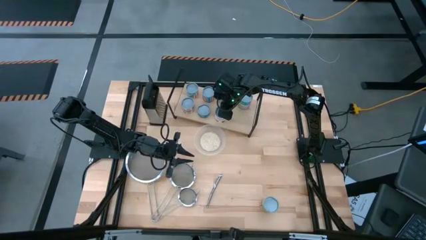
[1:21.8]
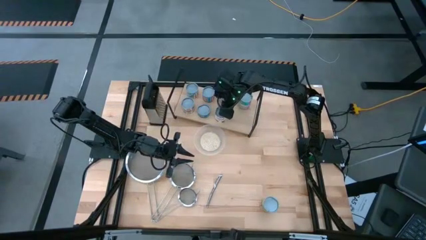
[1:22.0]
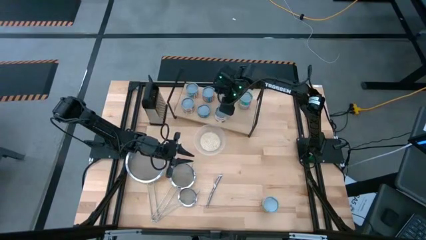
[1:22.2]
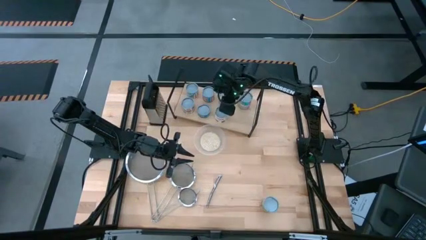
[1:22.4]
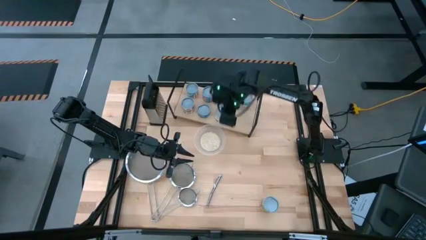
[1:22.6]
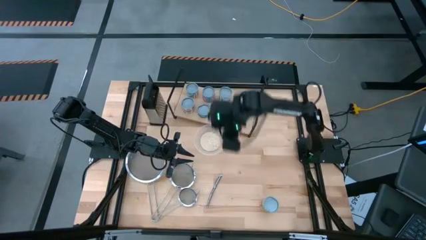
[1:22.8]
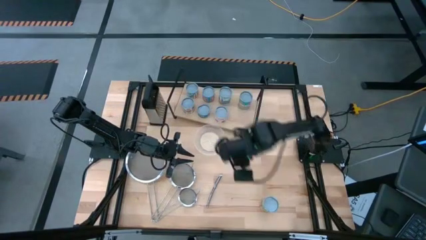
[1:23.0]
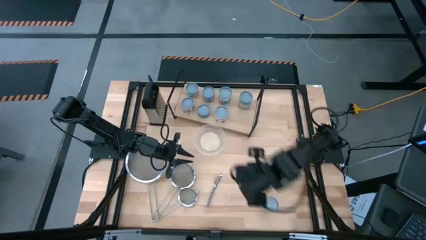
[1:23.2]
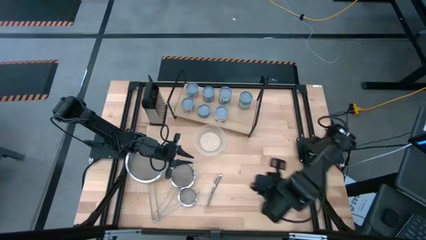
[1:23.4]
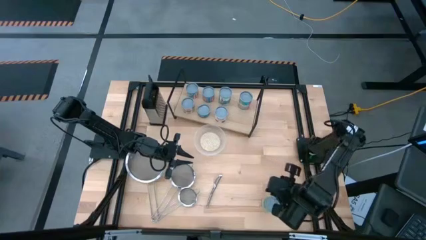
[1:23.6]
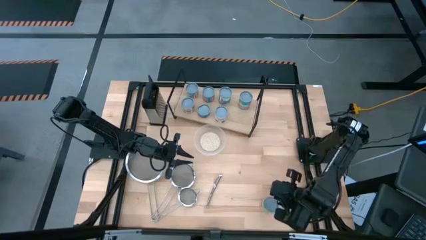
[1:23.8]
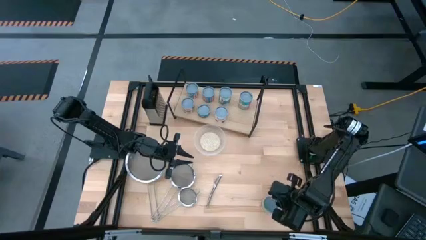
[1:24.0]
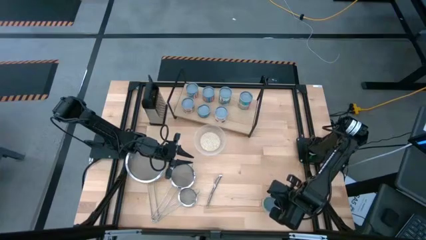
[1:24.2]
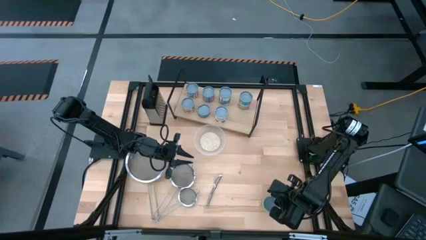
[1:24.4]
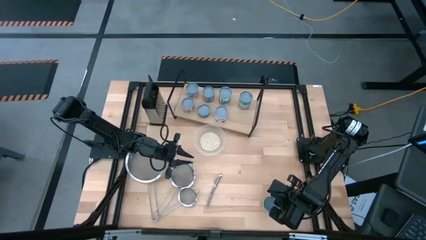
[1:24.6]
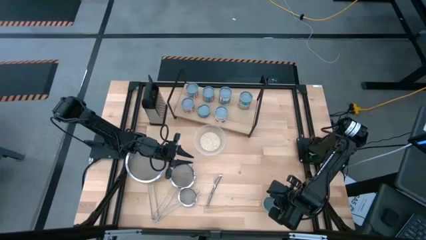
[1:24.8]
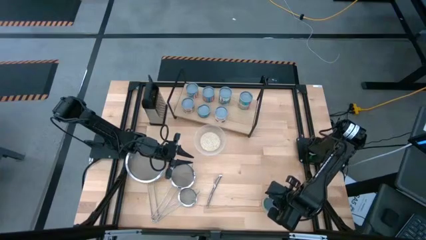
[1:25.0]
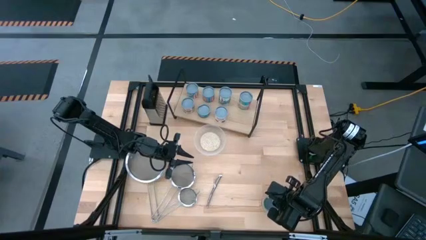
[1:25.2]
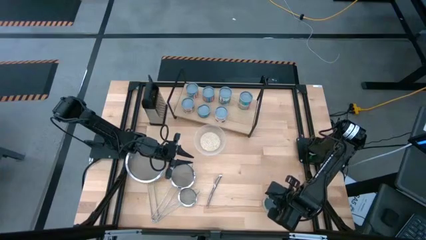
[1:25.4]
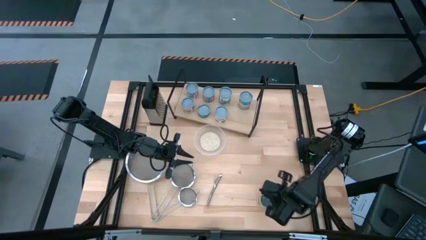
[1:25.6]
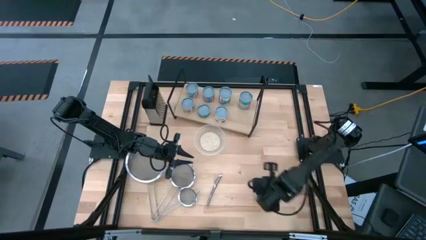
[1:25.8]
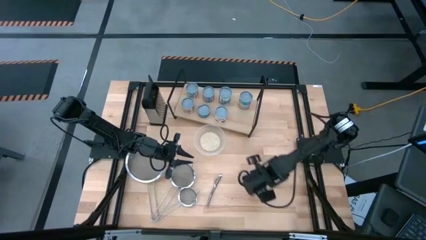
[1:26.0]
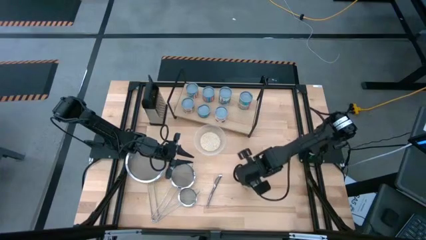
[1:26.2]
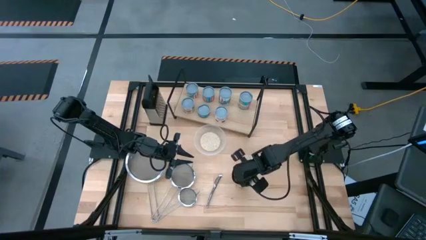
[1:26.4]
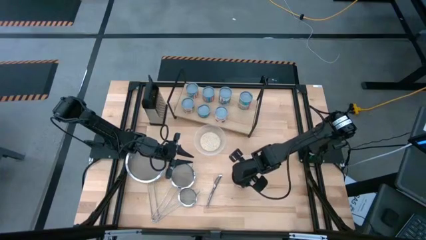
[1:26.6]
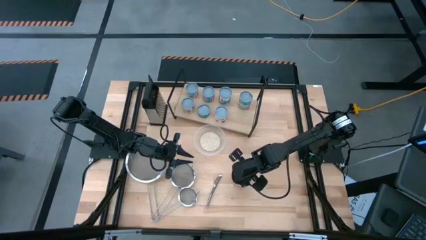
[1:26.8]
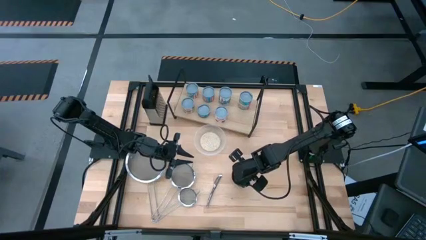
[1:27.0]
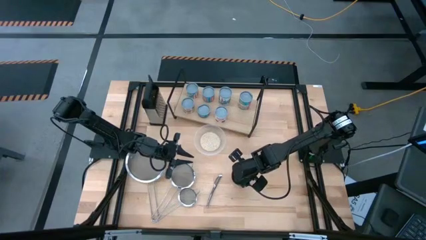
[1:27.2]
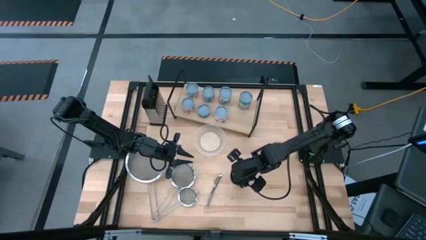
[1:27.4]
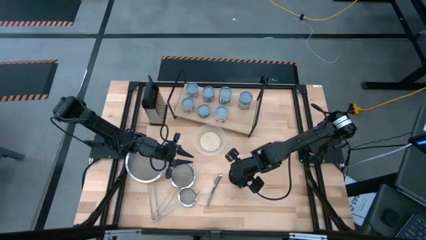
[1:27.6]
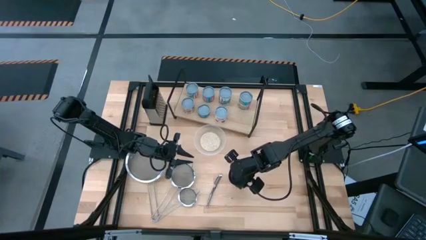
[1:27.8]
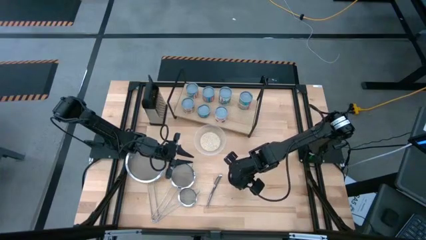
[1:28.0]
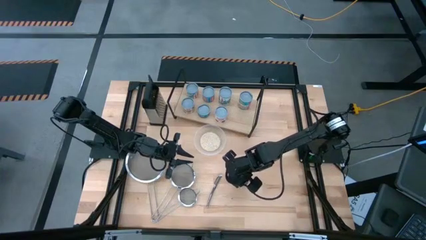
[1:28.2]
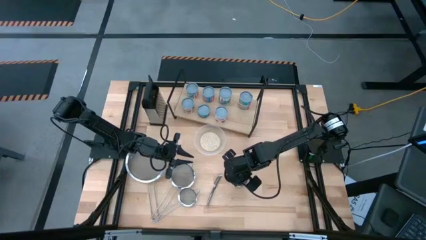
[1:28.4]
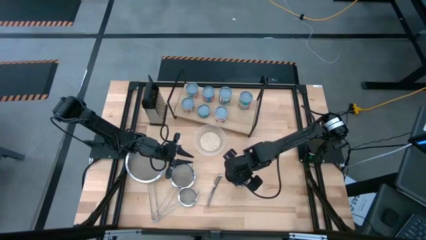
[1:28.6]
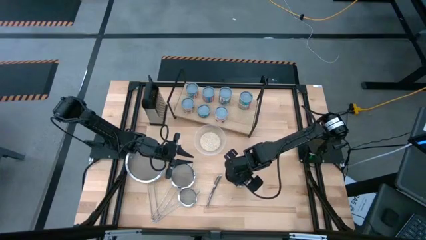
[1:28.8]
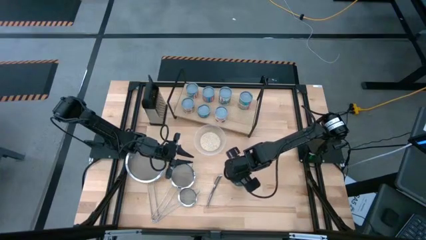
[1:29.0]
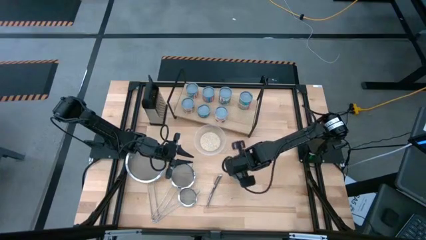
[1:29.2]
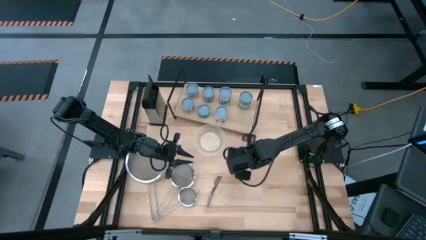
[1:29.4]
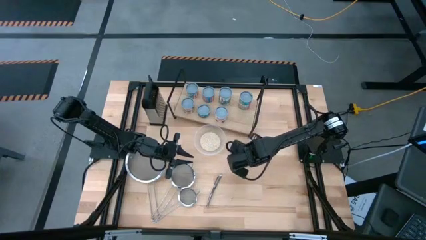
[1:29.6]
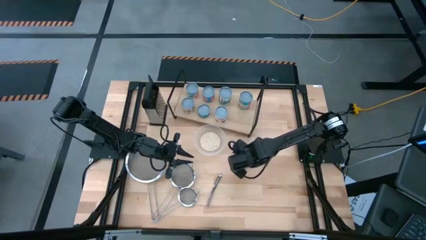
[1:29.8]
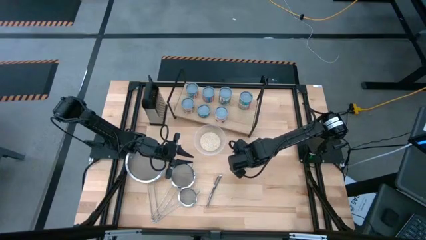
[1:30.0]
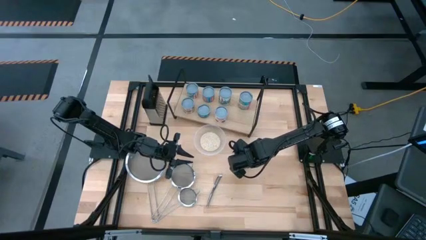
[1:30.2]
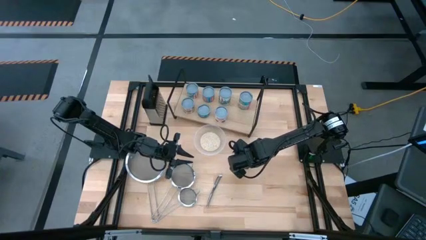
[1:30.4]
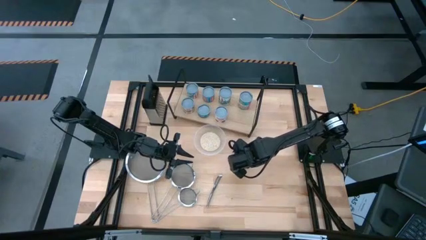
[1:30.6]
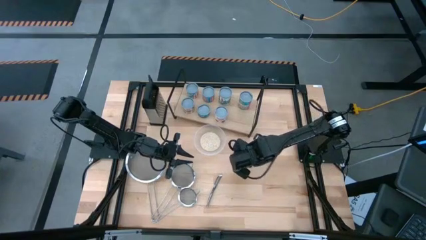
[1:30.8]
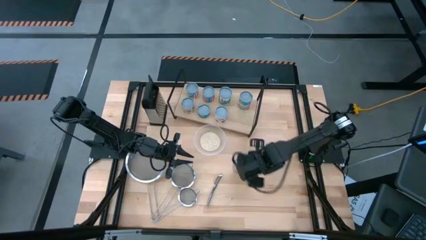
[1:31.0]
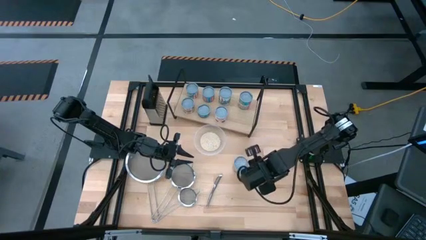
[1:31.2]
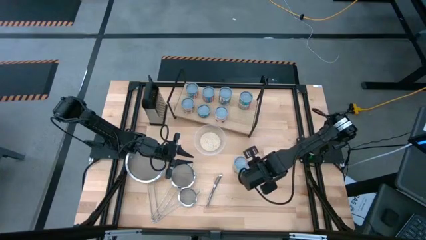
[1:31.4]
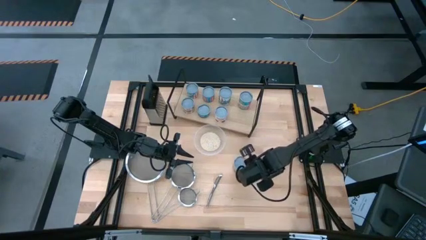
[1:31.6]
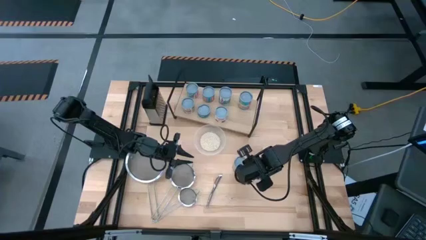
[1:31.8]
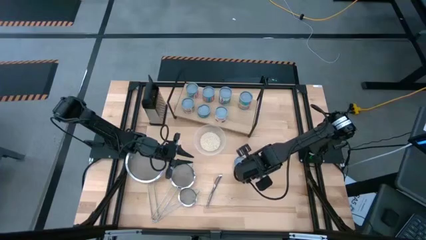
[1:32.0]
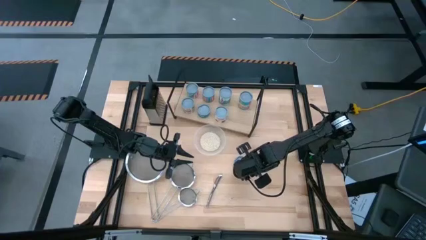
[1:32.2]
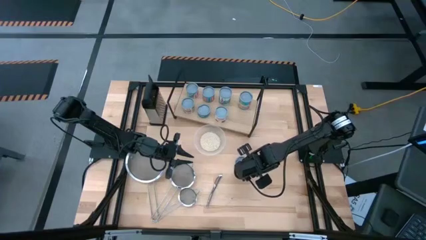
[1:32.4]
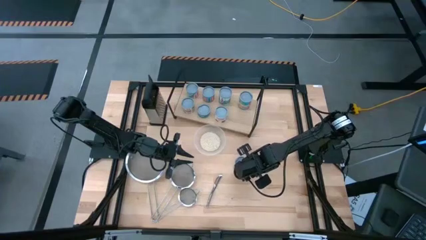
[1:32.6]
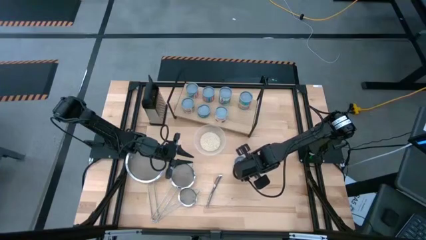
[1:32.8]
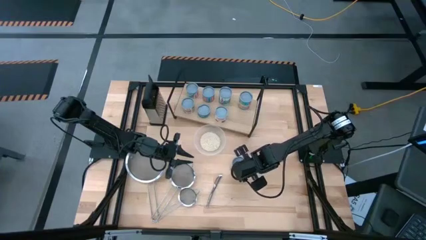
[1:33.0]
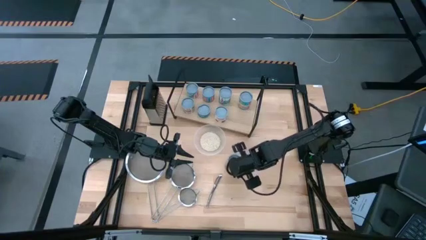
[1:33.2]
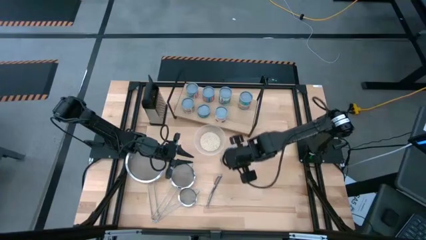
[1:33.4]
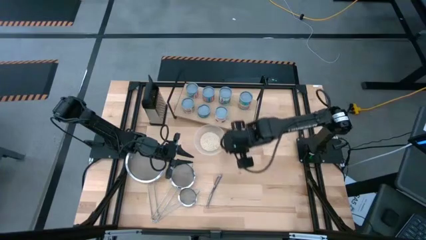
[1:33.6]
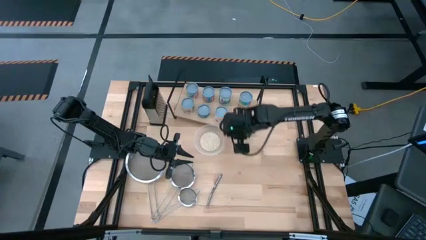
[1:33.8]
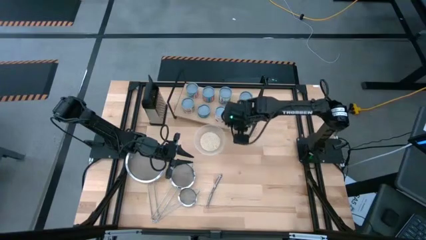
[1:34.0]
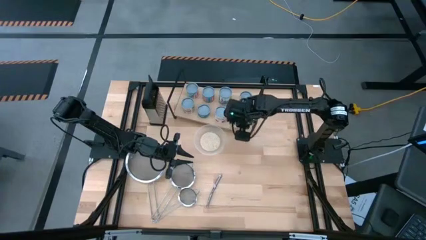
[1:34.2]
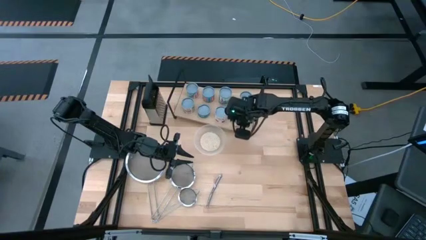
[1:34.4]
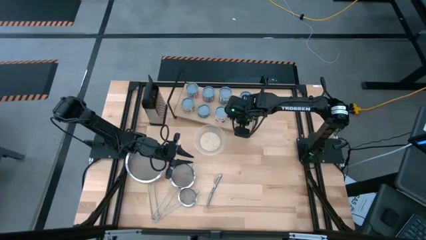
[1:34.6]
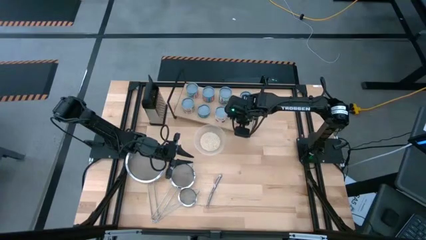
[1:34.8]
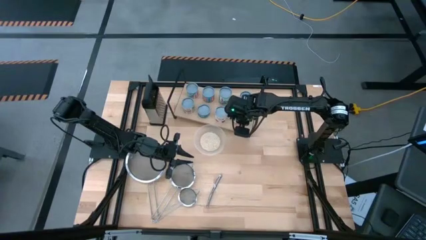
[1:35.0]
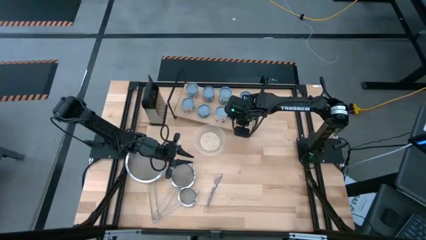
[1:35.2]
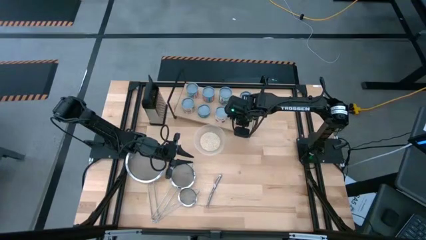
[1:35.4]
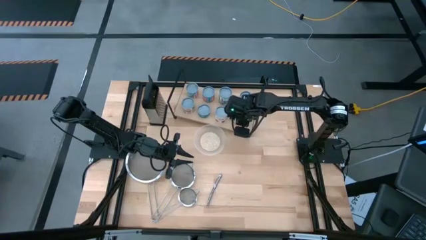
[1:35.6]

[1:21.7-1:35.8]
Task: Pick and place cans onto a shelf
Put the canned spaghetti sauce on the shelf

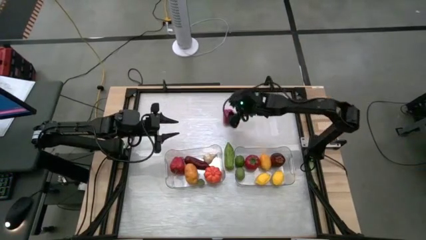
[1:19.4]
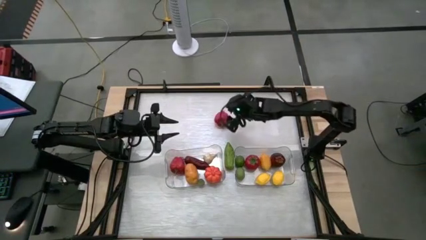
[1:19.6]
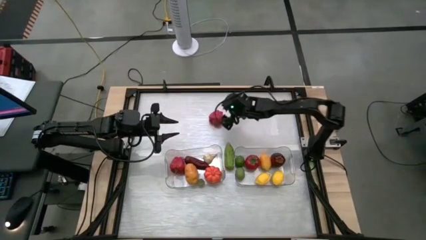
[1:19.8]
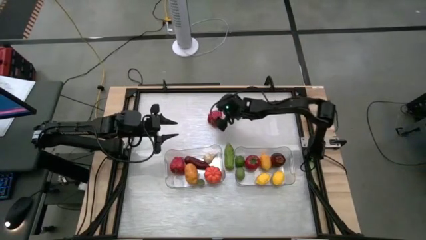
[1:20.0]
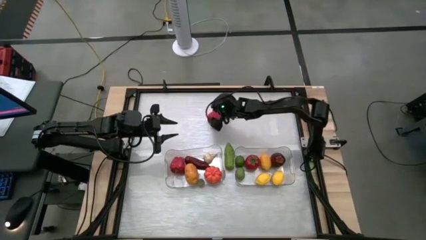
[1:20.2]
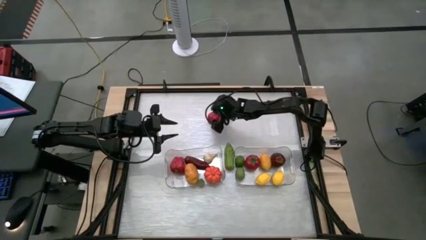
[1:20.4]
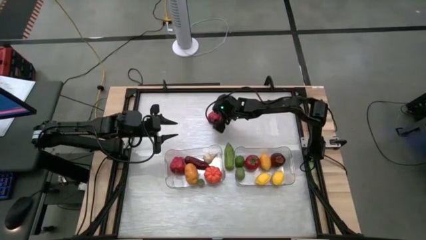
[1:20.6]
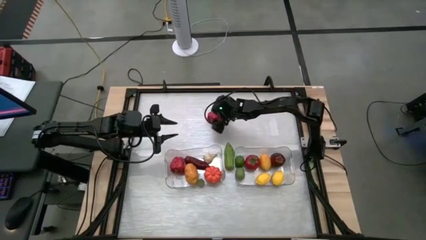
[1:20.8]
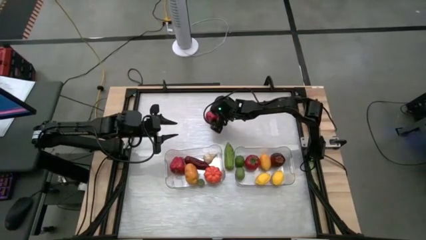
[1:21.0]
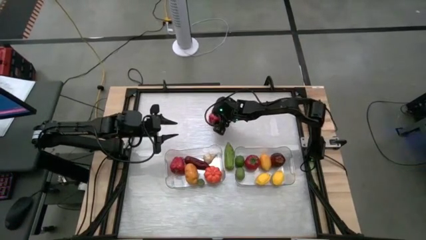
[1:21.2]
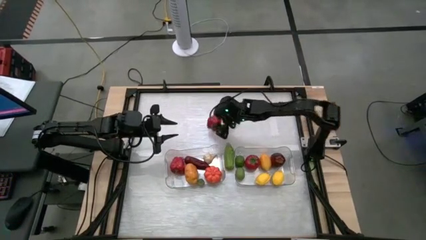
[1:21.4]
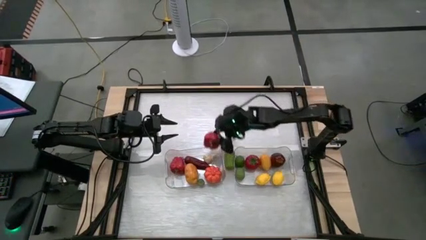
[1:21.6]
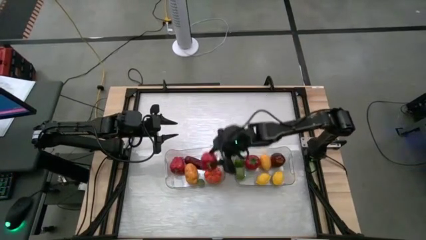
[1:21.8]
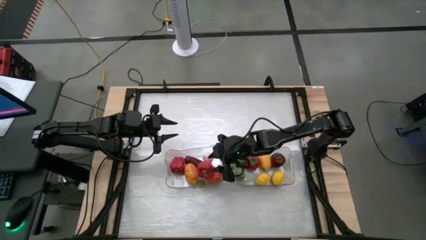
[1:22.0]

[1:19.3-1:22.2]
Task: Sort produce into baskets
Put the red bell pepper into the left transparent bin

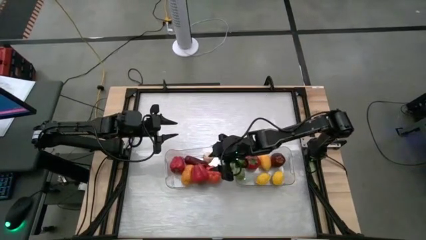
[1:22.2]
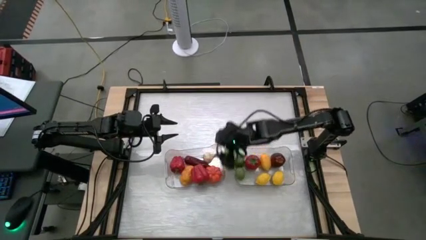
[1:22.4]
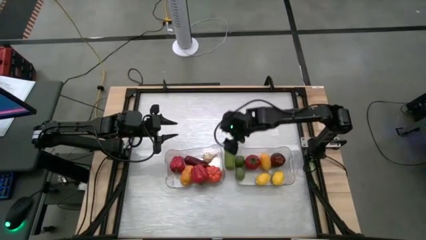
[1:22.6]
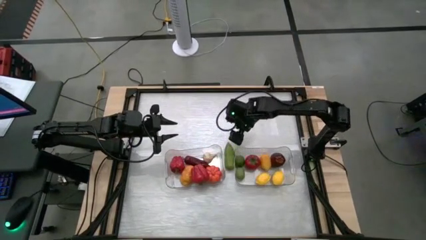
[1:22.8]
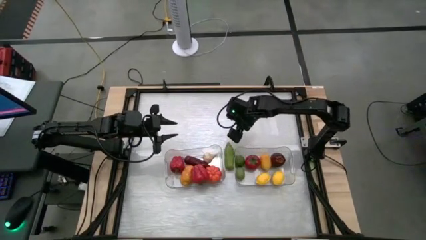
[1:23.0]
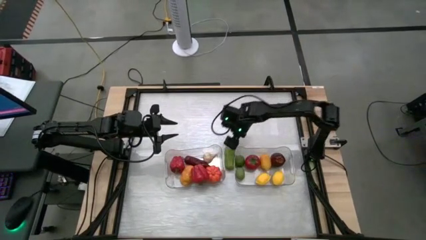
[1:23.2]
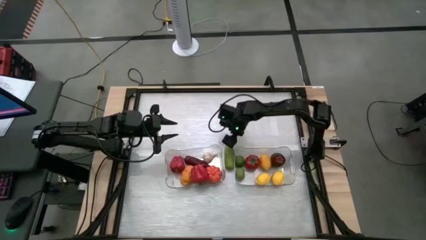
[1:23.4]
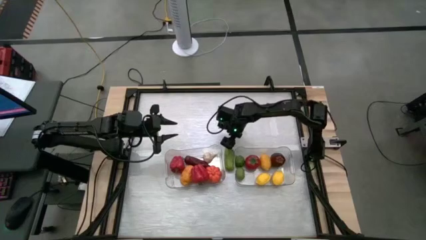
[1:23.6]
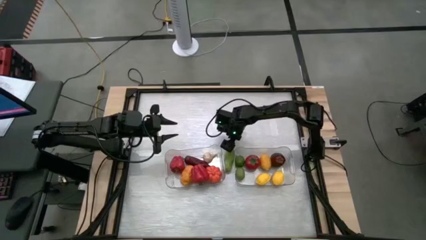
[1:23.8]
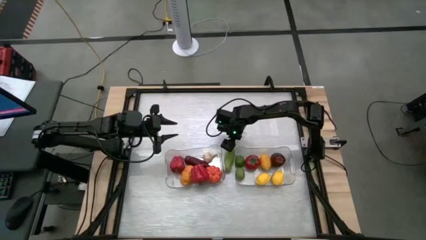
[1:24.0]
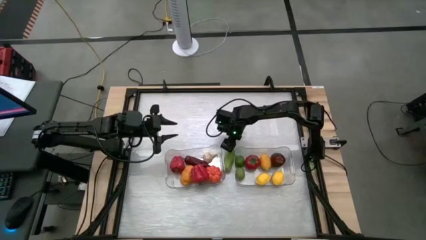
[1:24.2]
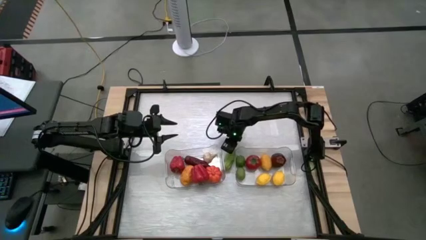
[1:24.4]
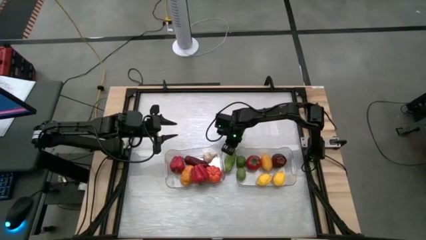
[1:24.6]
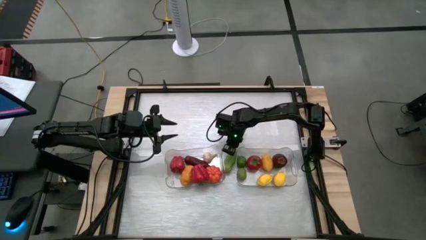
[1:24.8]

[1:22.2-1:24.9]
Put the bitter melon into the left transparent bin
